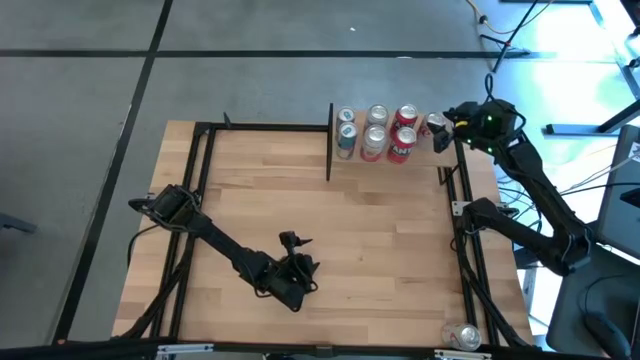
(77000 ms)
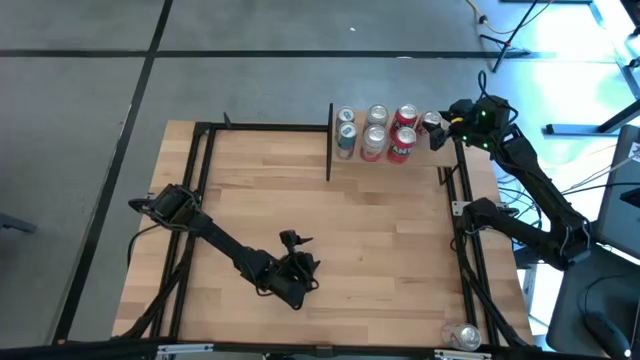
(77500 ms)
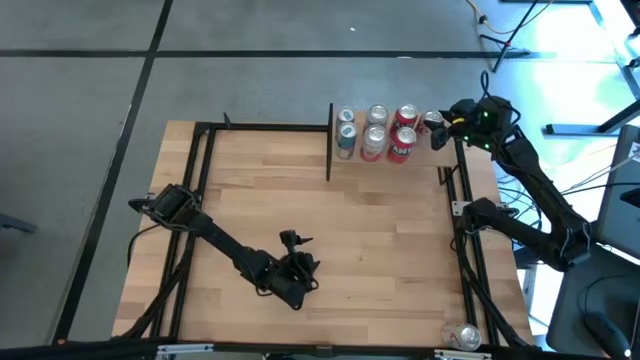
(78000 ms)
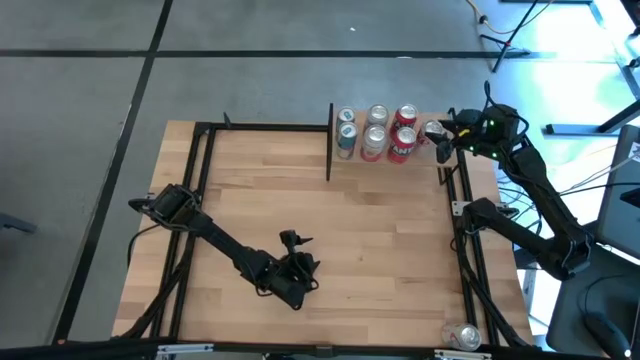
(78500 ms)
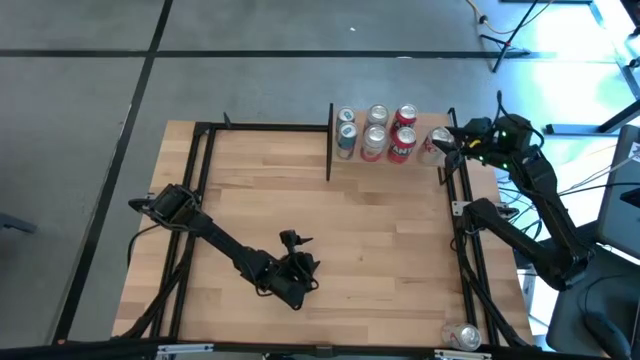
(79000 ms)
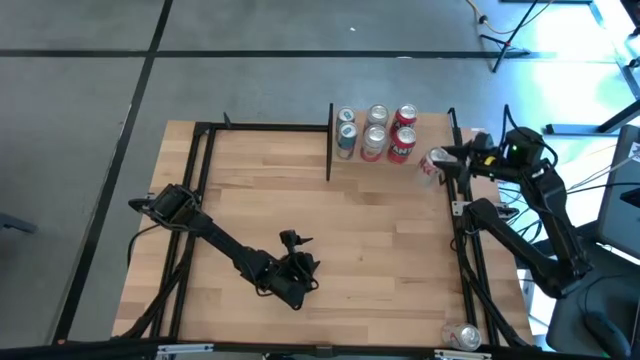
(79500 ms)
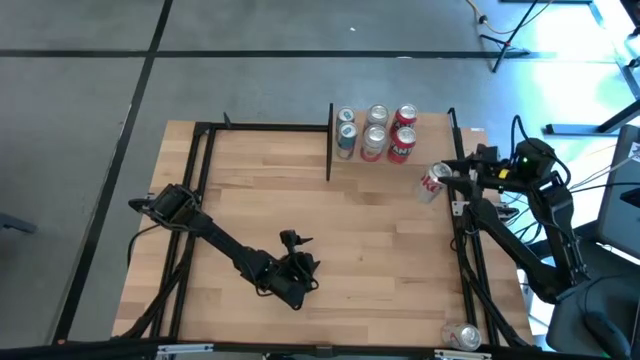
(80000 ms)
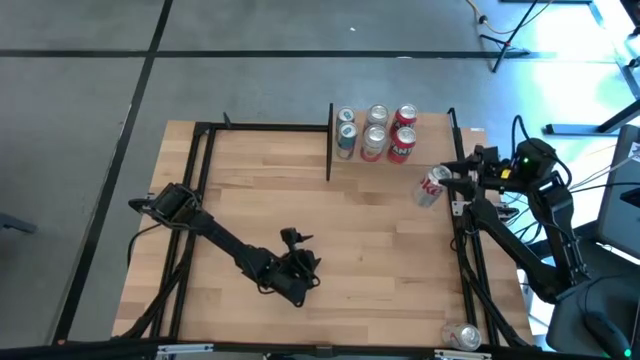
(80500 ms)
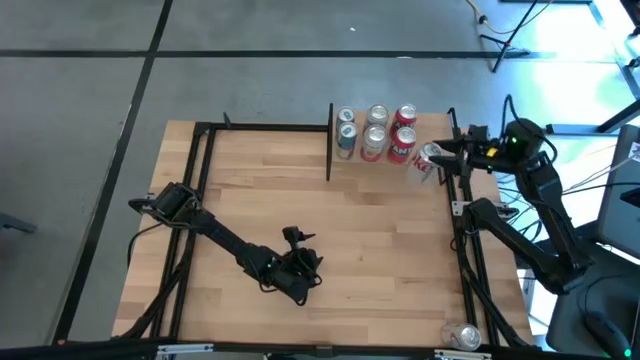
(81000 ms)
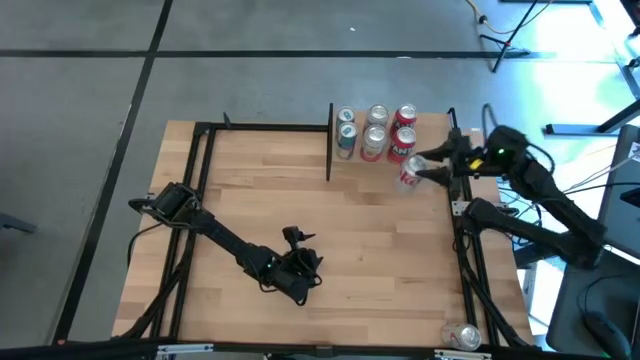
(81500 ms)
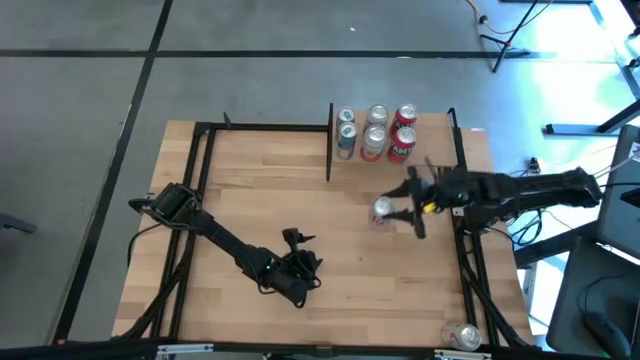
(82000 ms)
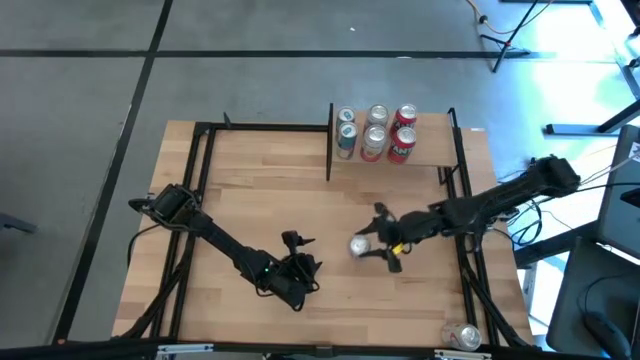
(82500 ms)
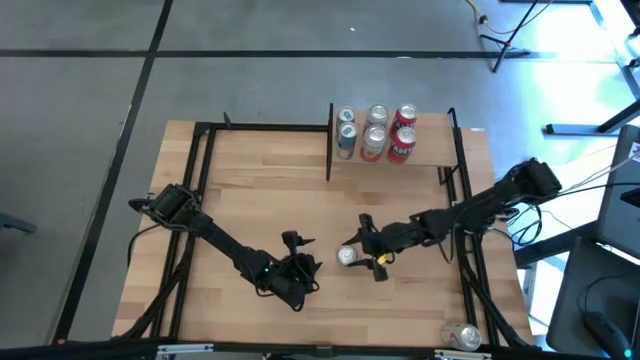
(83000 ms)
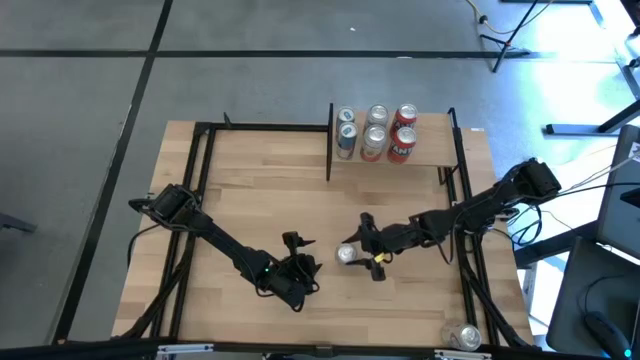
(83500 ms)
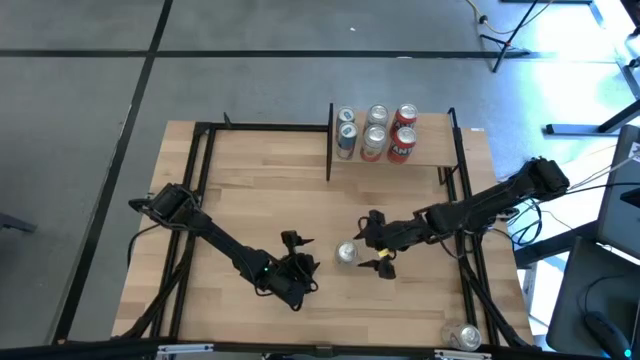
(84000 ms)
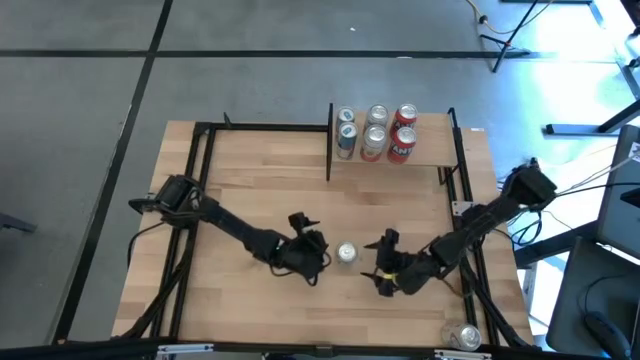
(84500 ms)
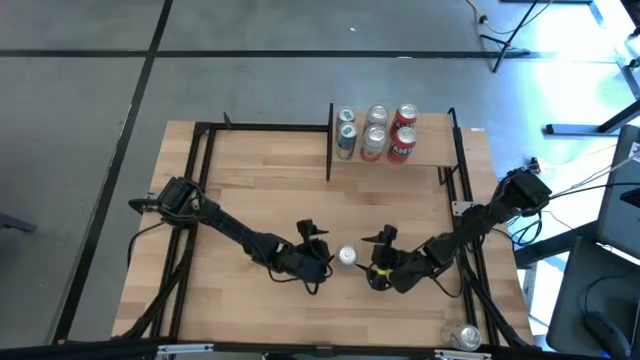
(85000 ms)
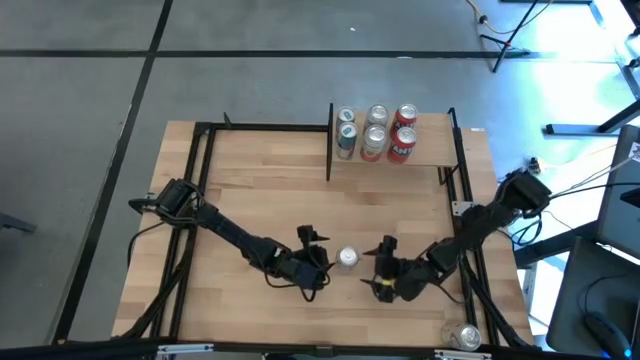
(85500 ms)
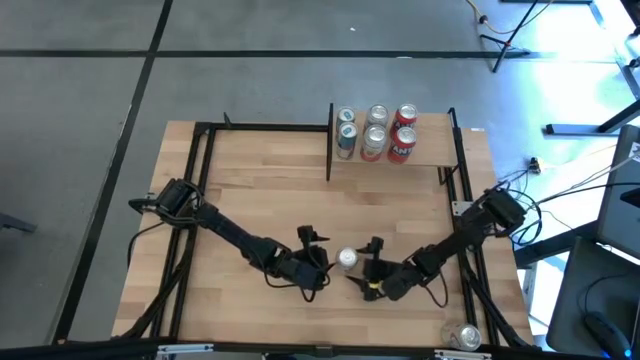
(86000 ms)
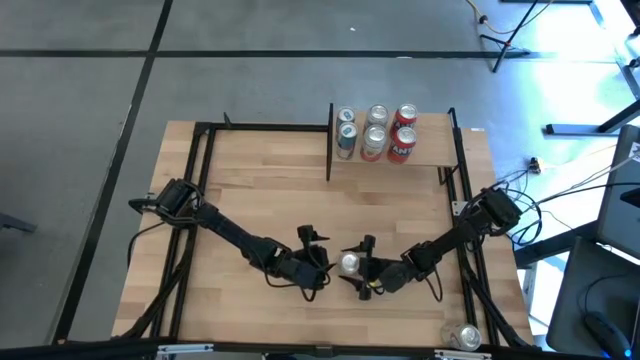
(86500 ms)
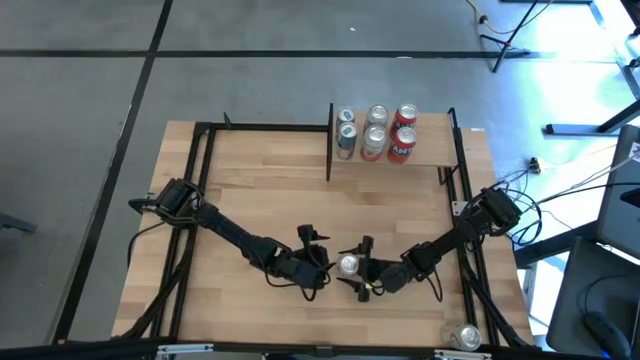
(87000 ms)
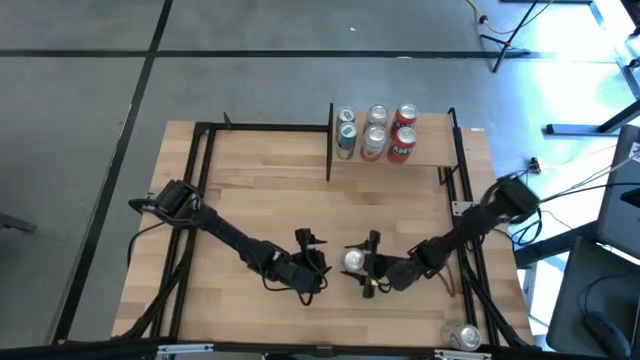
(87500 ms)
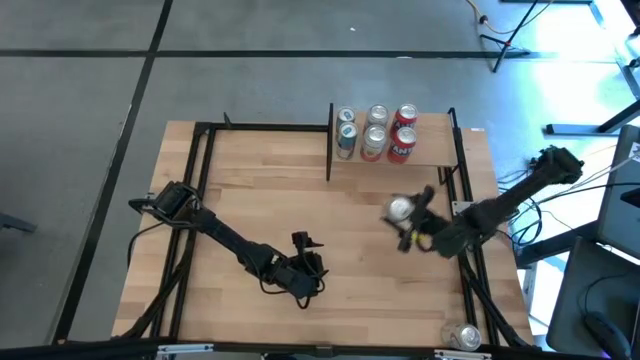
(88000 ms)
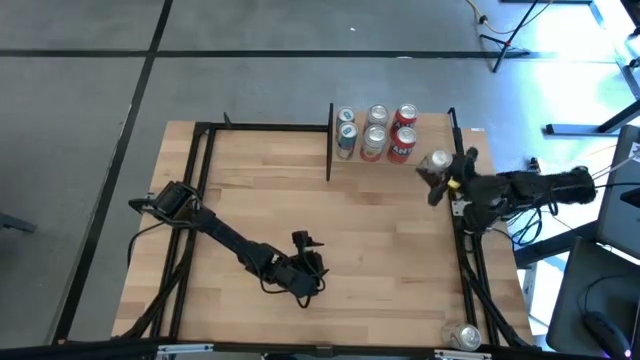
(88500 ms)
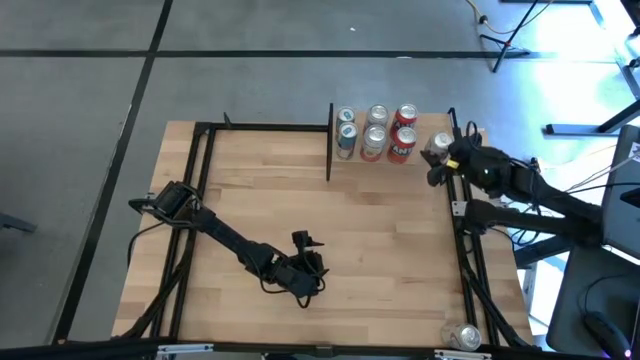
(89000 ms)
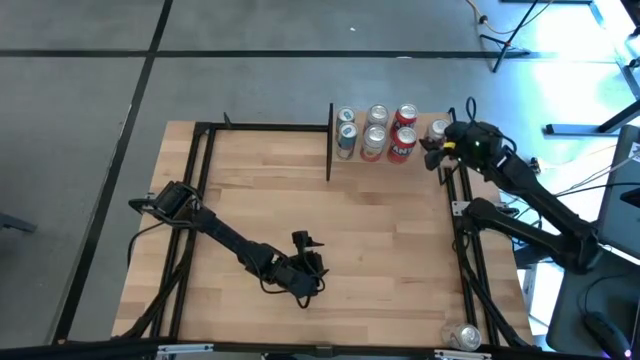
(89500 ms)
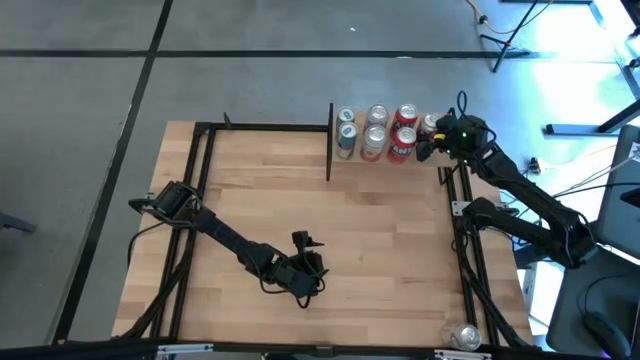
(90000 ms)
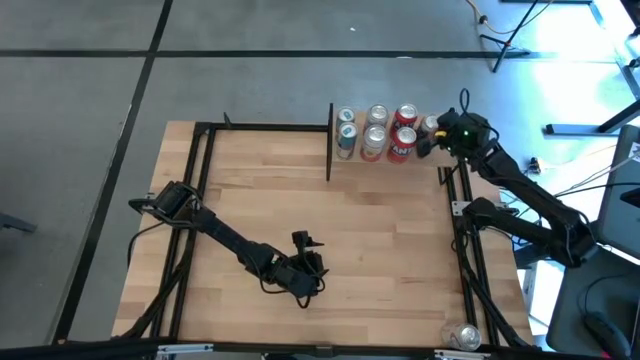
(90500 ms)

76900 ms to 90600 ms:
Task: Place canned beverage on shelf
Put the top red silver soda can on the shelf

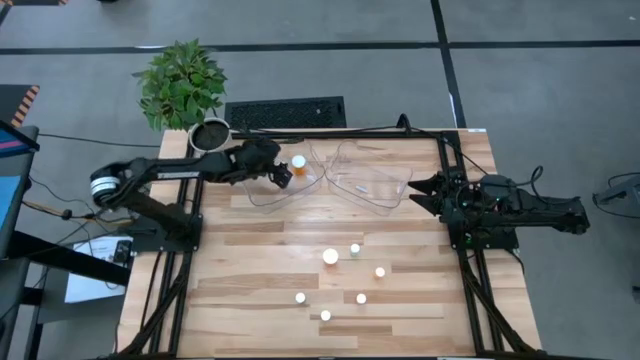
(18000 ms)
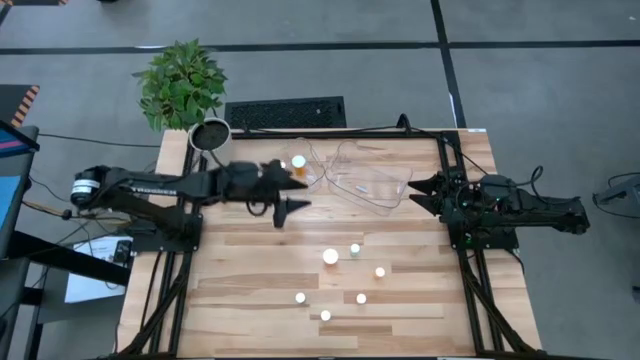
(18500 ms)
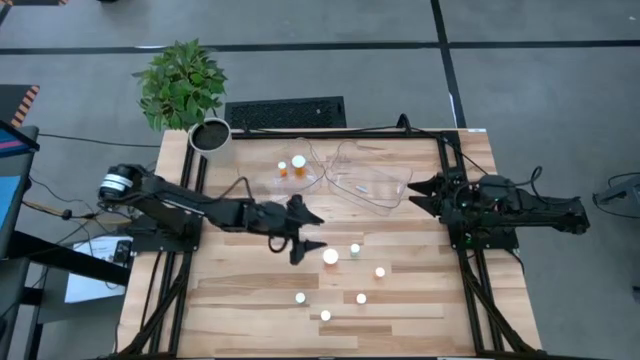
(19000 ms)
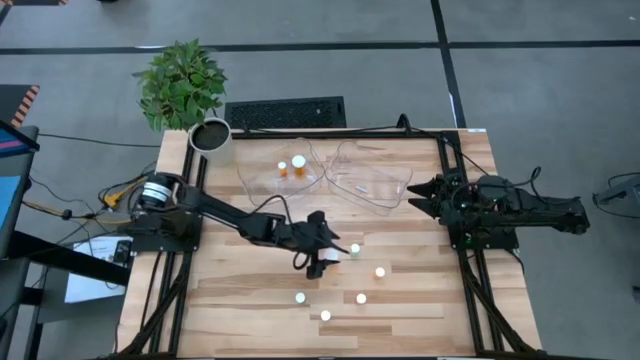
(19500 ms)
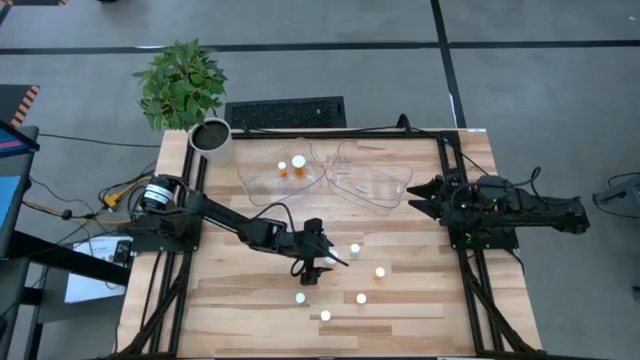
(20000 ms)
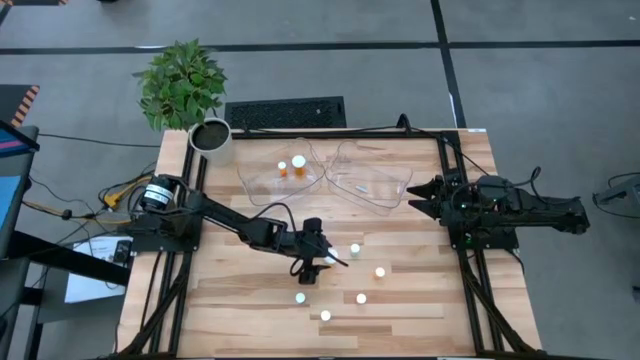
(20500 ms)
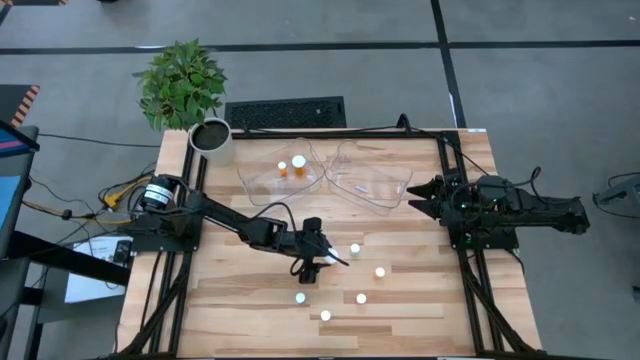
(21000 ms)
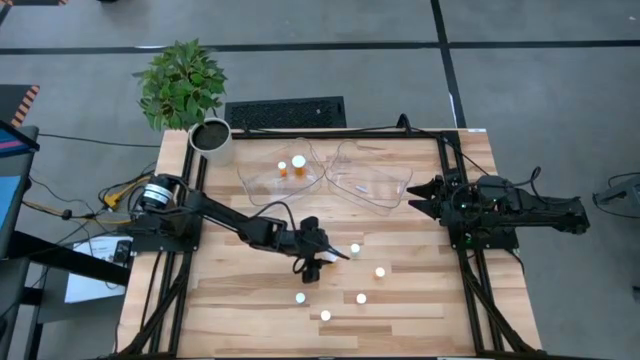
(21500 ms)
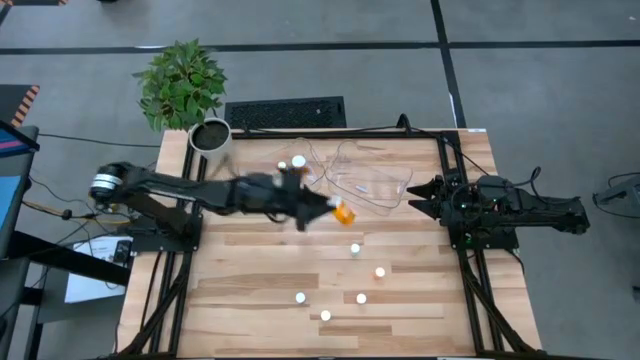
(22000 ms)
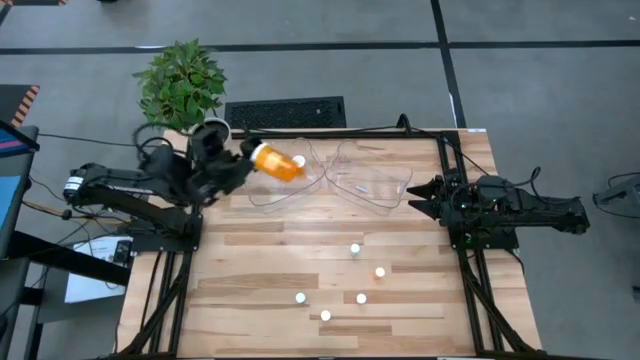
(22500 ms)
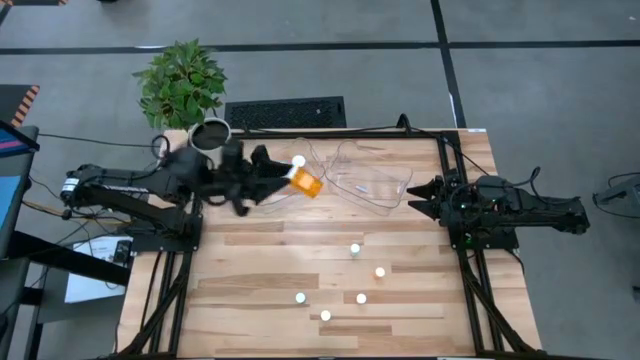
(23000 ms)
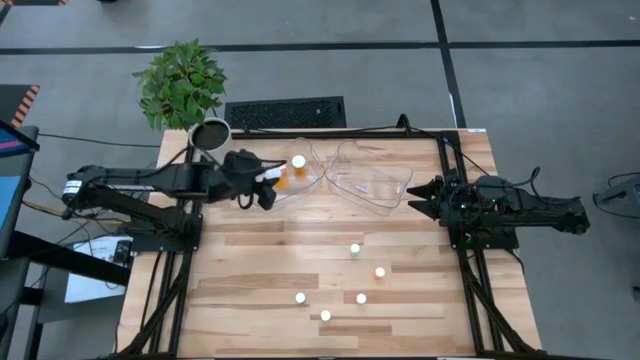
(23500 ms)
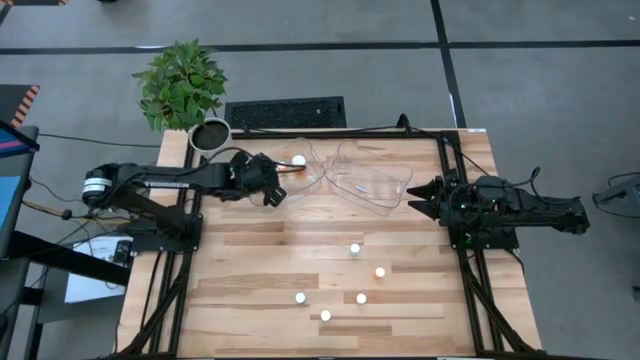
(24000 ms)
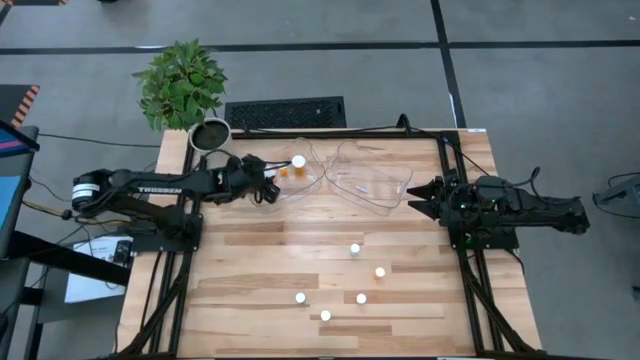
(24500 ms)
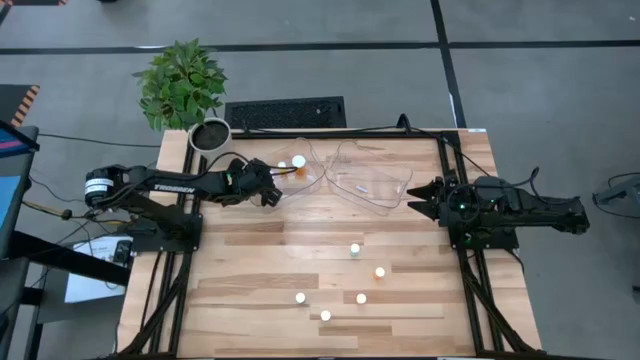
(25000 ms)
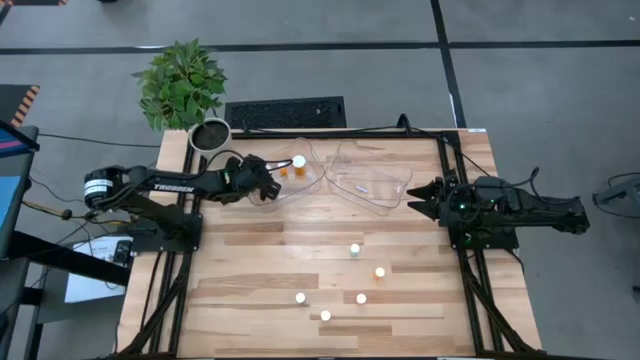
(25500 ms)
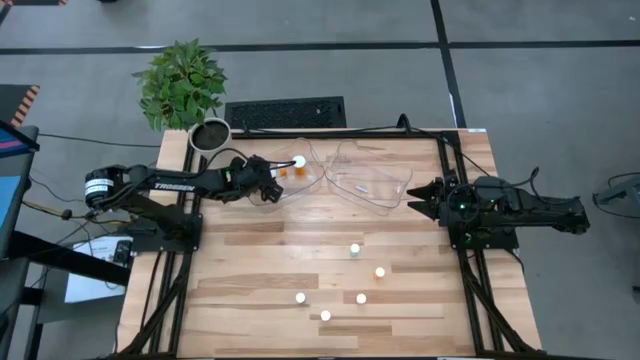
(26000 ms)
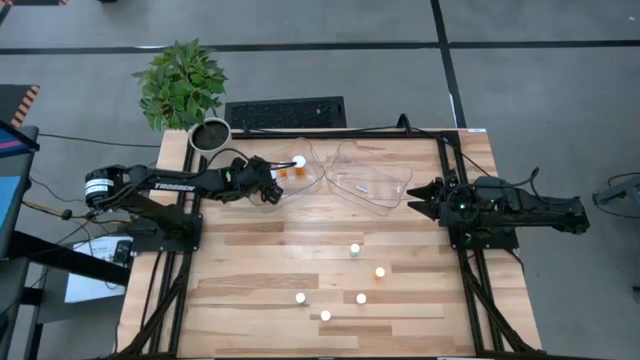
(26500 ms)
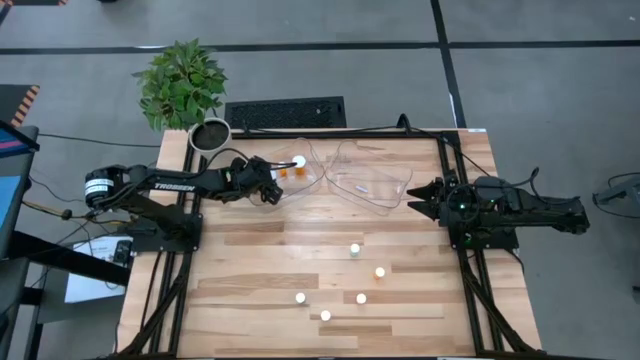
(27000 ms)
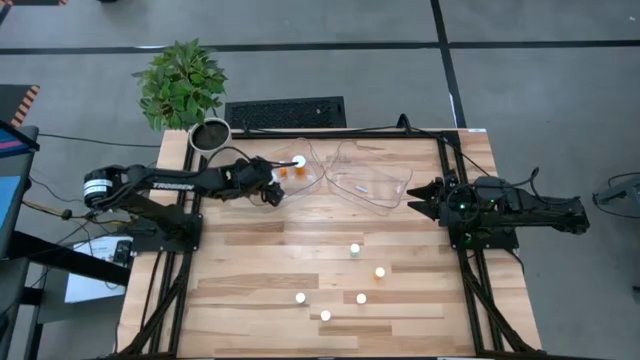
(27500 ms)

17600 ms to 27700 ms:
Task: Pick and place medicine bottles into bin by pill shape (circle, oval)
Put the big orange capsule bottle into the left transparent bin
